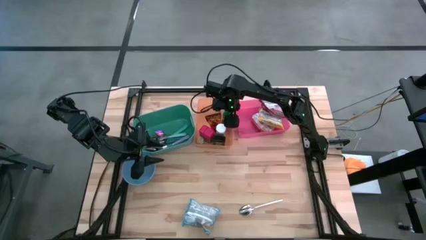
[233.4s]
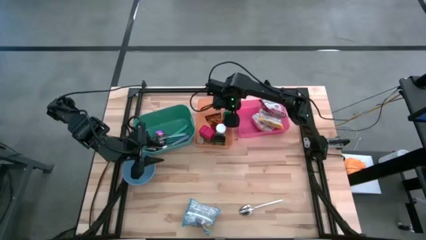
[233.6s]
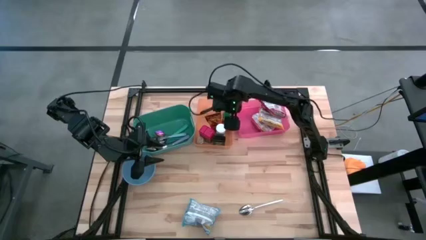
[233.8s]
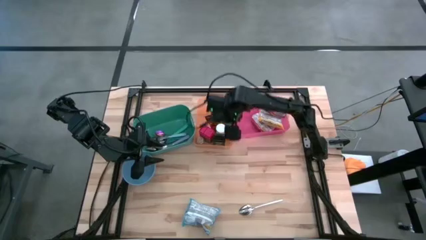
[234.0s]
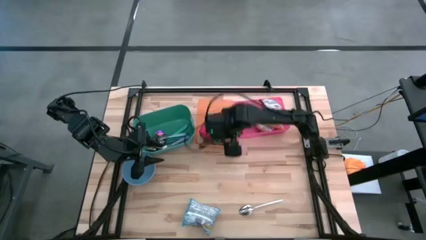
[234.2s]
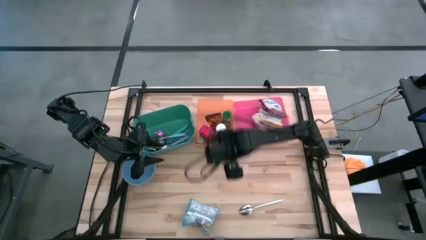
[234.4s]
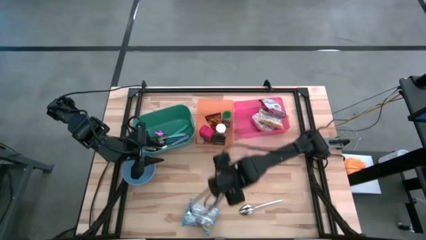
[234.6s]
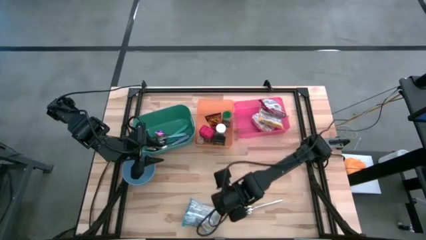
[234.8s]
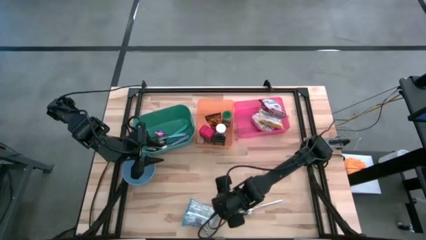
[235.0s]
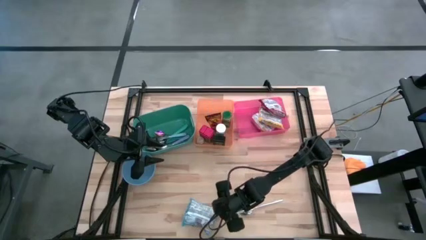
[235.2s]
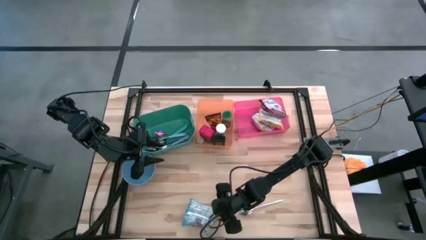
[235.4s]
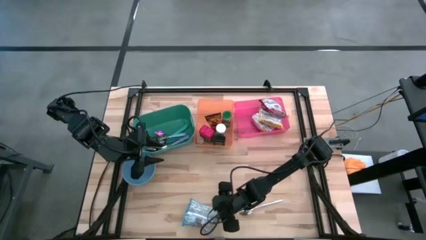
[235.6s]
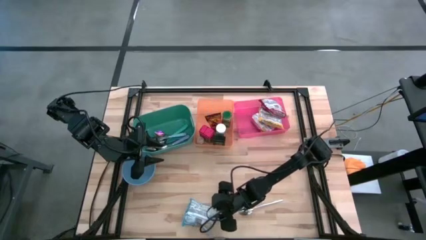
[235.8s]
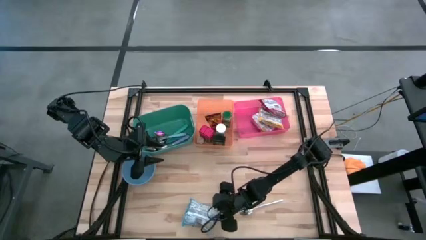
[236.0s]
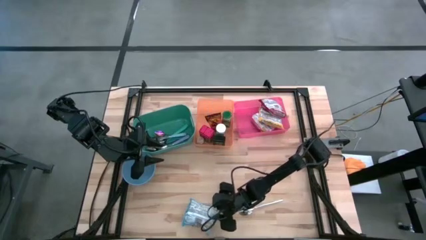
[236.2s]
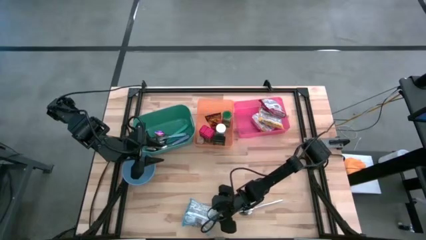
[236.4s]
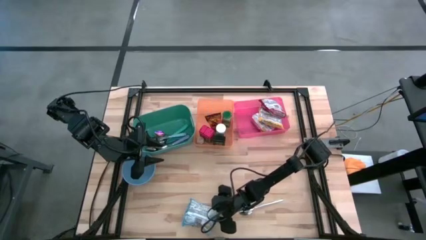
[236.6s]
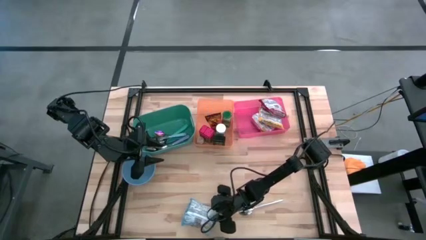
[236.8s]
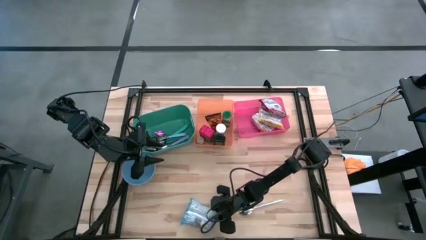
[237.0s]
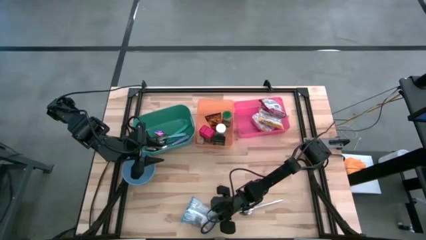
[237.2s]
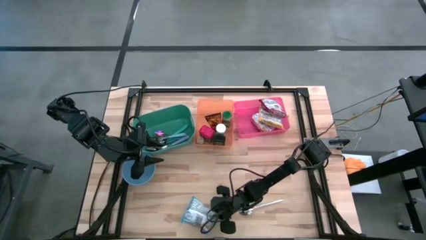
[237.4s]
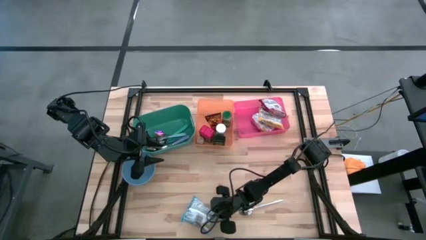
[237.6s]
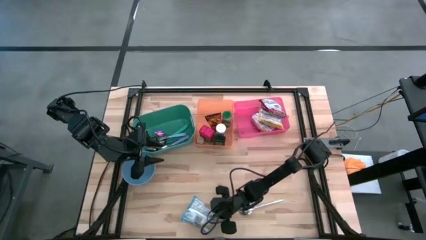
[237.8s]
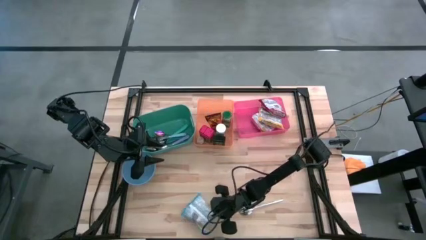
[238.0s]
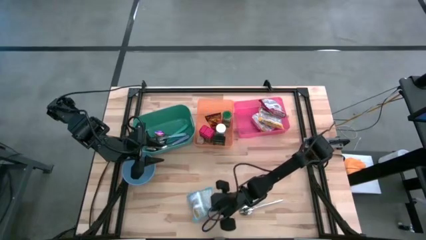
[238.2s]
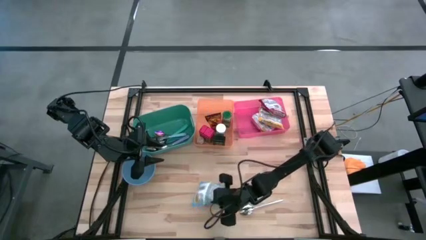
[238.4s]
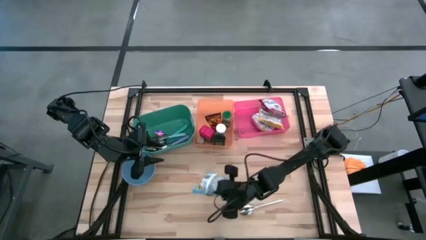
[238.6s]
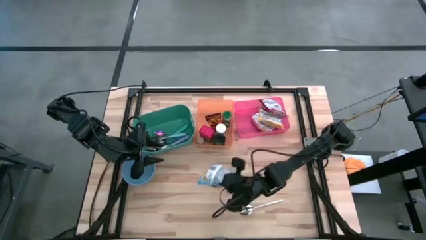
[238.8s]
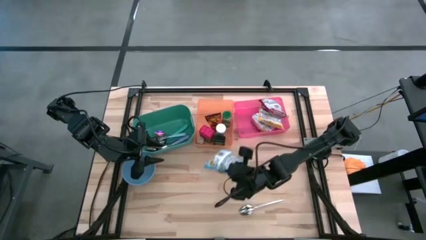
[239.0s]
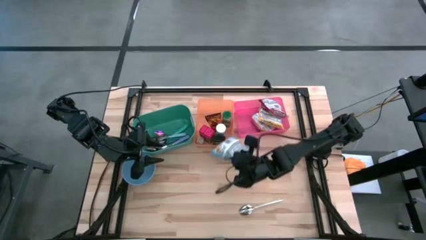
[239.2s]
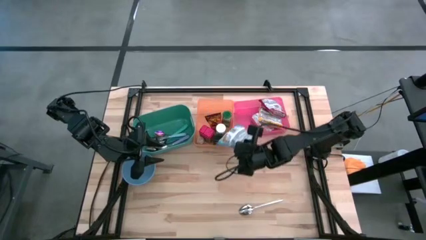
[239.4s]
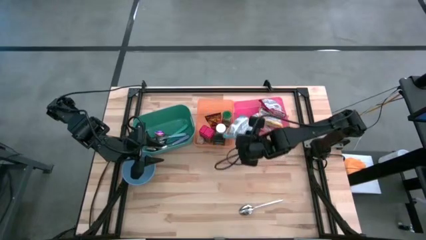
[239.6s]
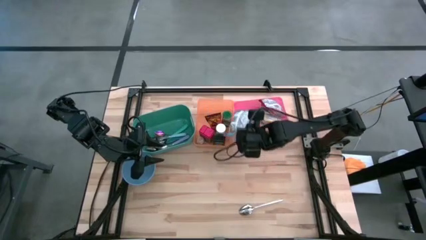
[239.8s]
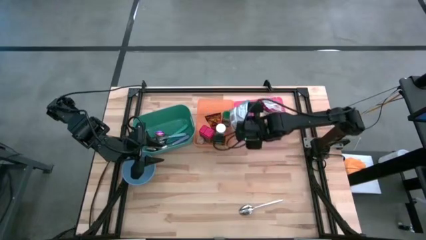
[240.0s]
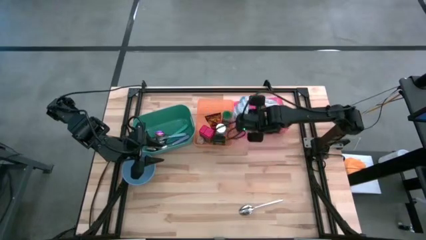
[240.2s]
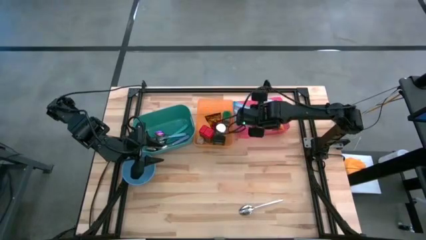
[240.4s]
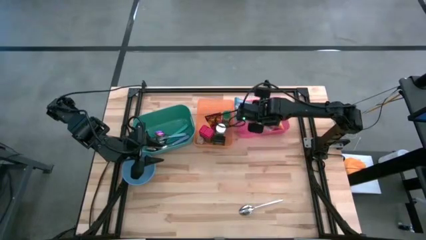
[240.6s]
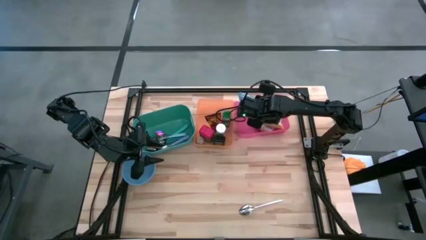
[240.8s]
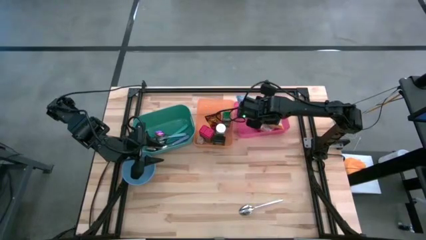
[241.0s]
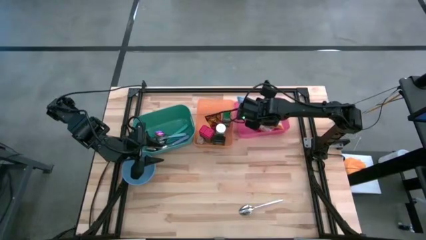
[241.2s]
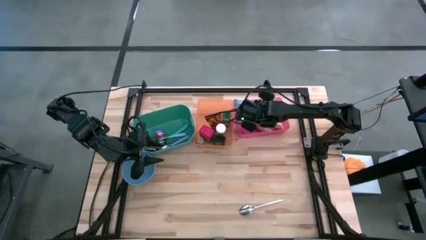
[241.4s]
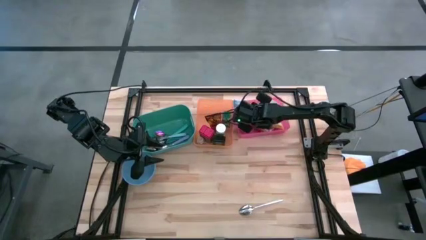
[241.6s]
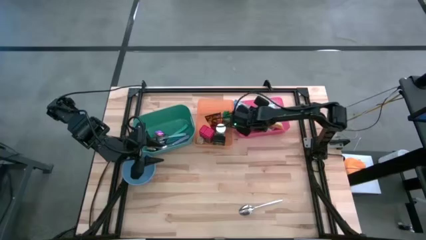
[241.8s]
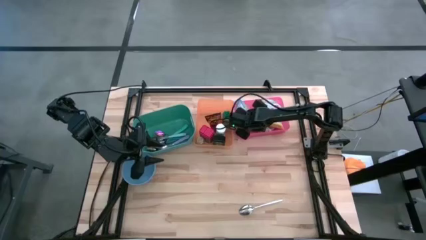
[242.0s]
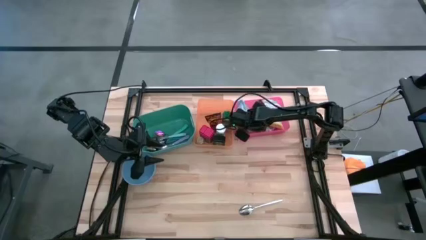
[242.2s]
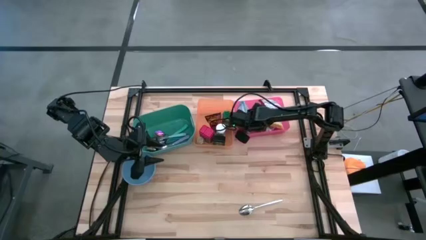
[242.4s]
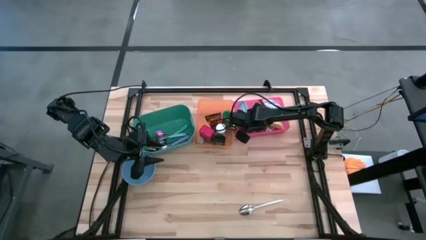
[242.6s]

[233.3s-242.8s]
Put the light blue noodle pack into the pink bin

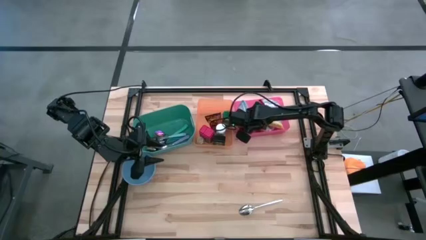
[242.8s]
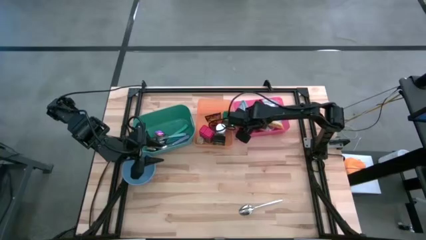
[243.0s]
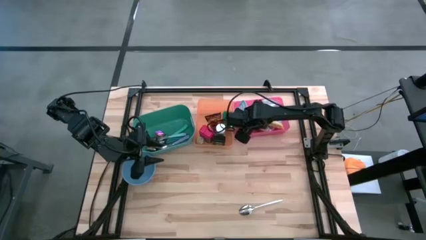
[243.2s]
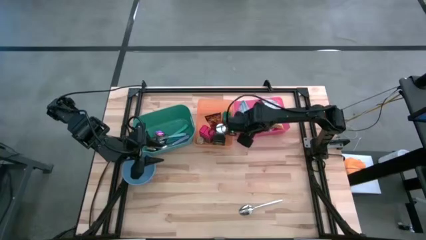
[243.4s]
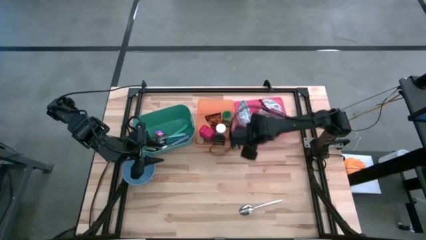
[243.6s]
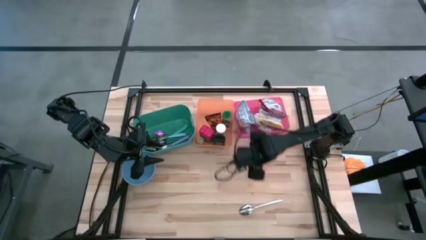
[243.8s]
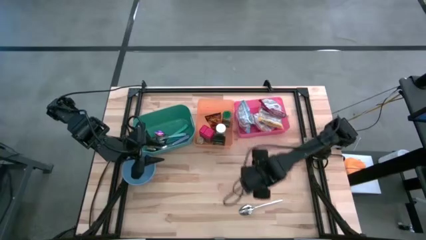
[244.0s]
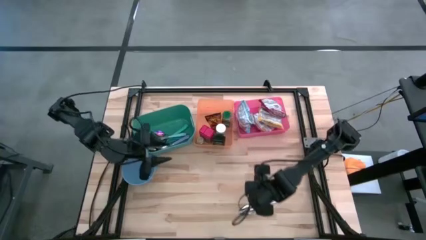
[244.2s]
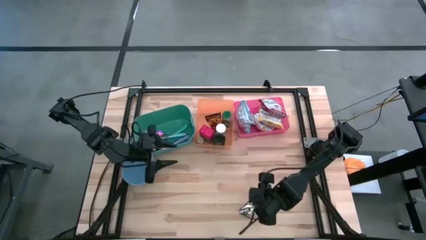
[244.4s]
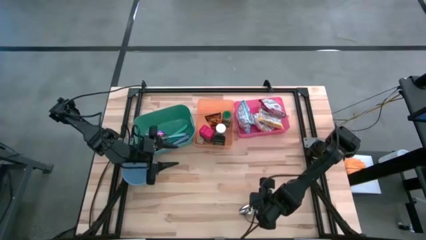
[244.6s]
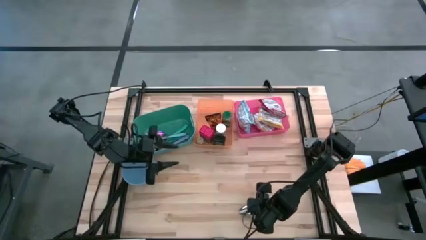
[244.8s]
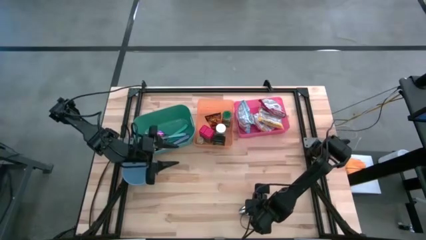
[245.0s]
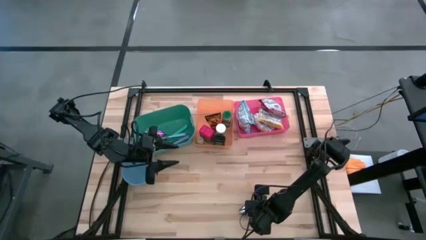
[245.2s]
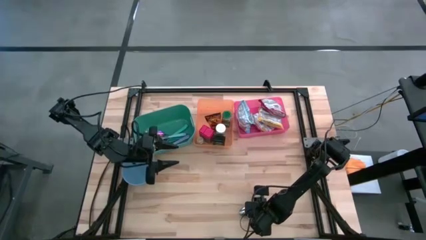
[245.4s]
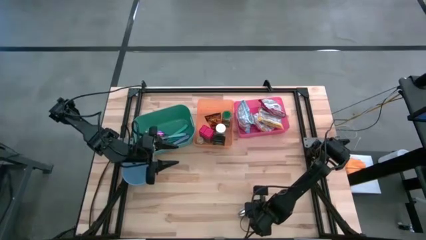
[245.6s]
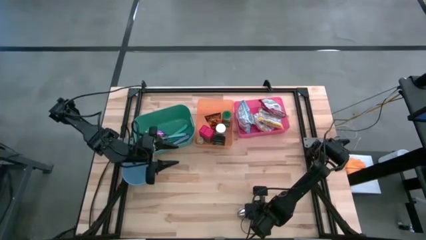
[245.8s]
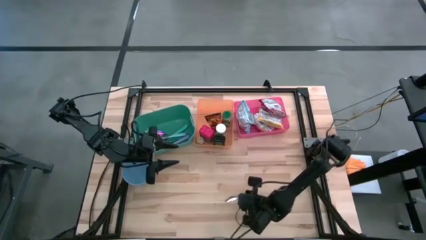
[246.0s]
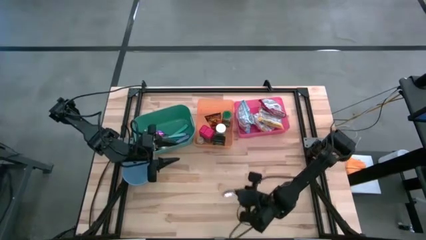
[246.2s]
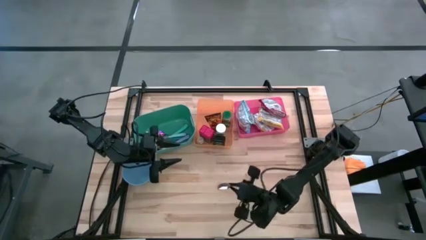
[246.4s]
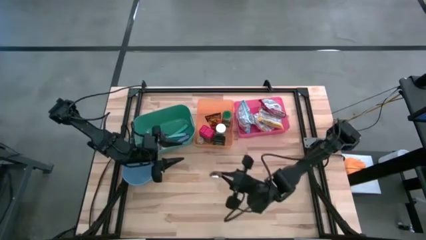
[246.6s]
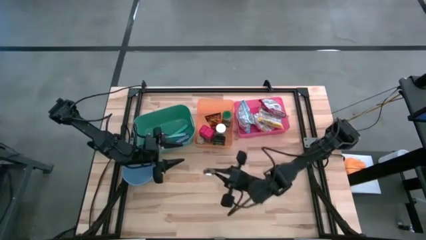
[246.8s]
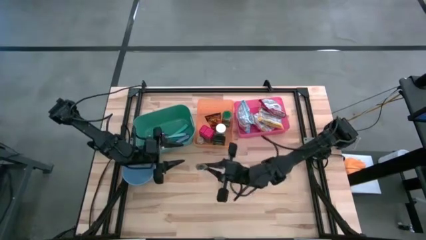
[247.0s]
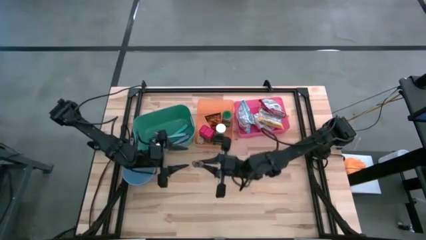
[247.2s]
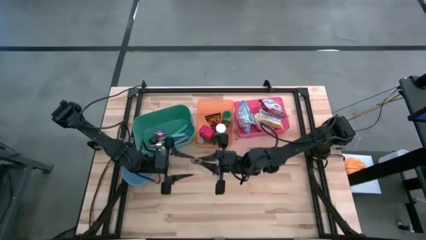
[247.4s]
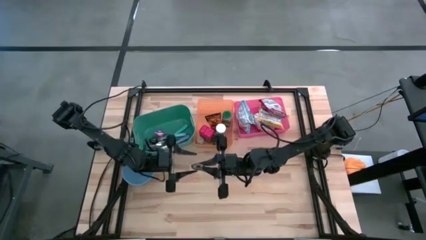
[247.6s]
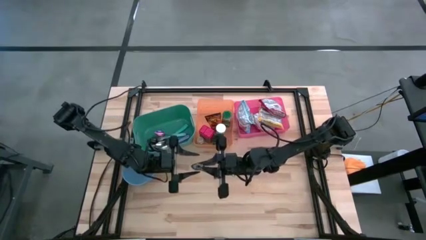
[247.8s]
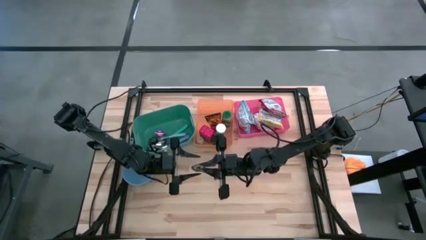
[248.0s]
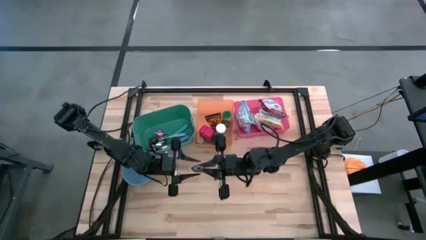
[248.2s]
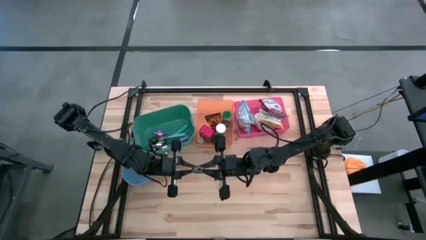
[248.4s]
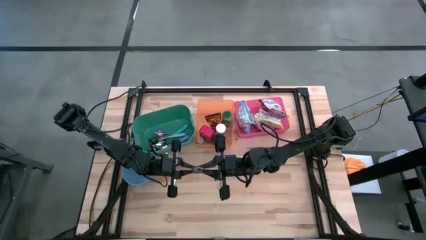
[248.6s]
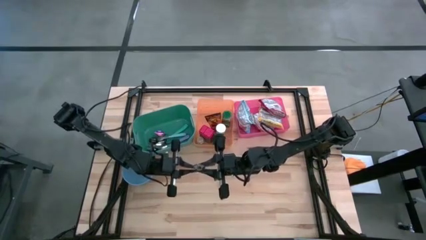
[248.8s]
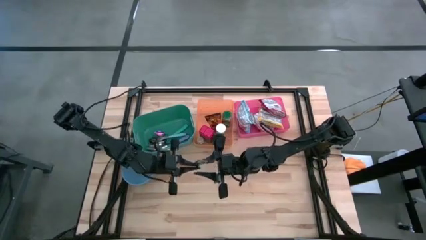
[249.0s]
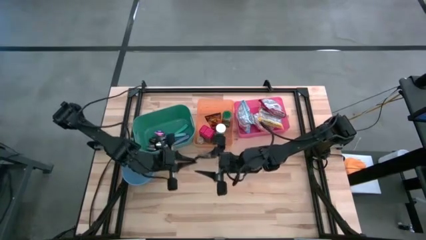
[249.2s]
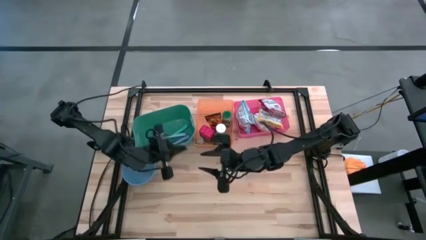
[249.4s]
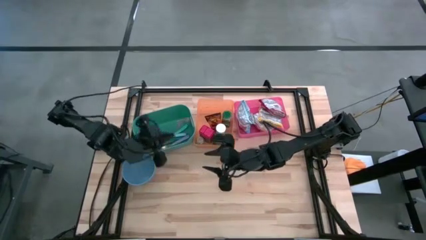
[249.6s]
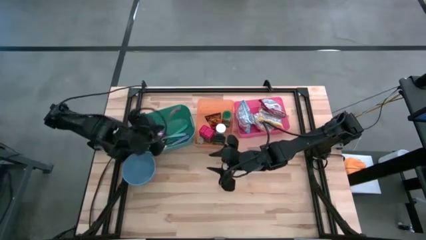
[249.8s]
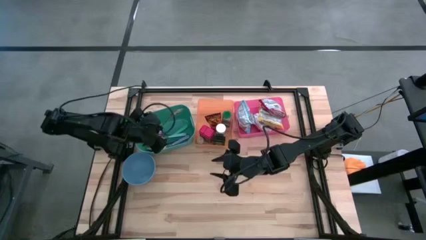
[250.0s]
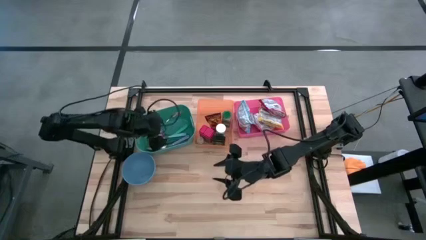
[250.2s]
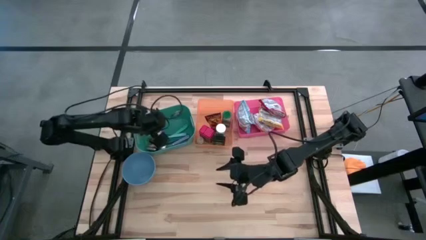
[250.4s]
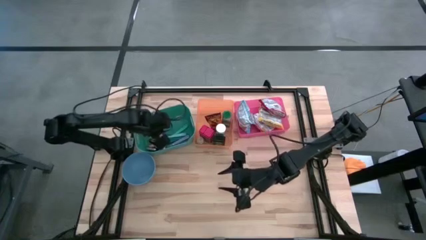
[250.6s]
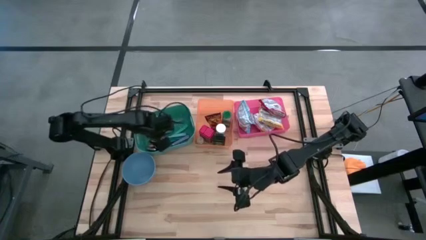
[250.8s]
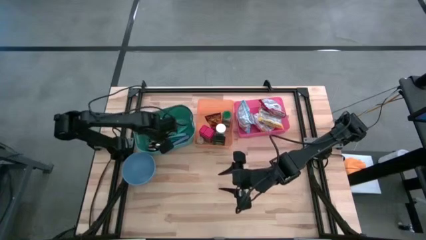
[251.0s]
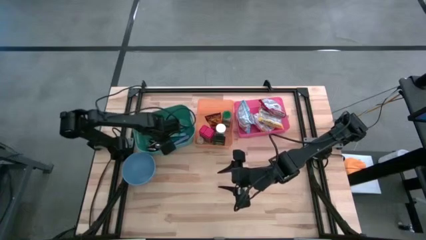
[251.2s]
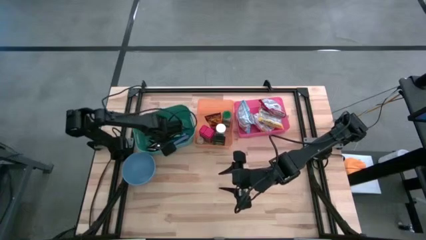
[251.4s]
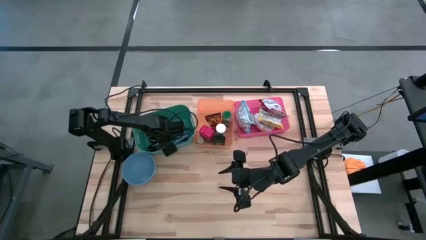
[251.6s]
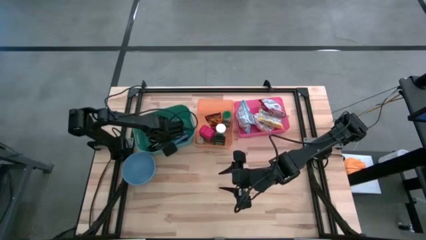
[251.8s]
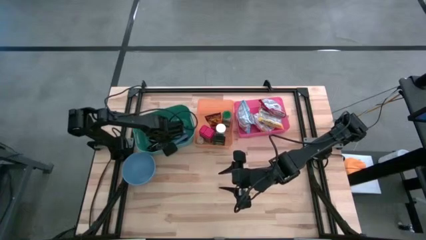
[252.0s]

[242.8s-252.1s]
Put the silver spoon into the green bin
